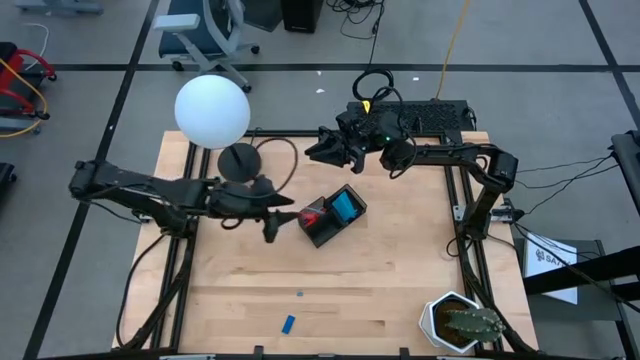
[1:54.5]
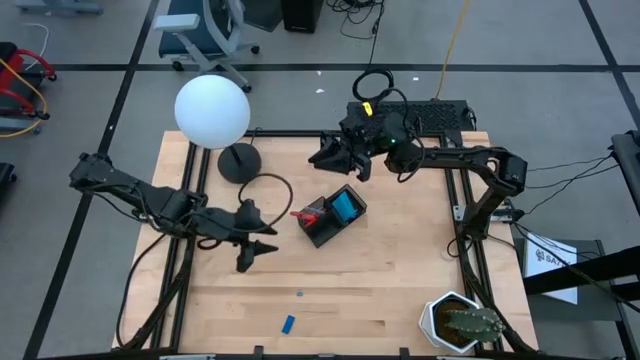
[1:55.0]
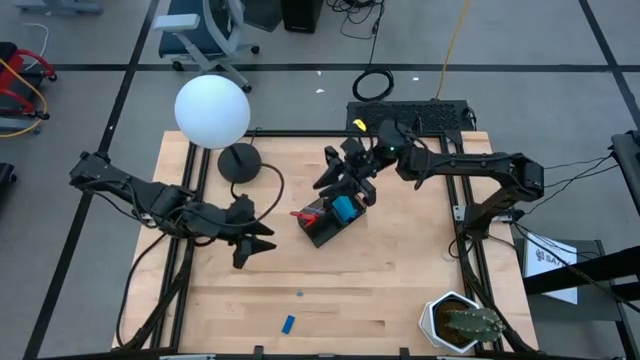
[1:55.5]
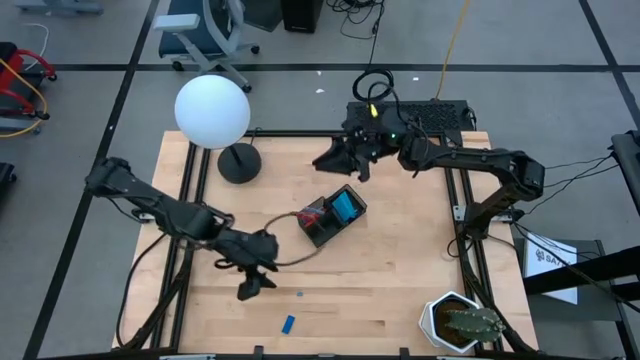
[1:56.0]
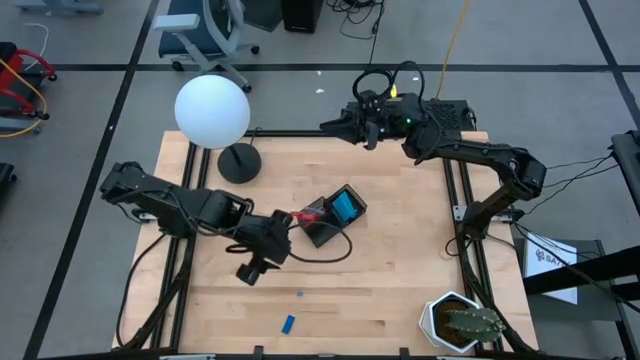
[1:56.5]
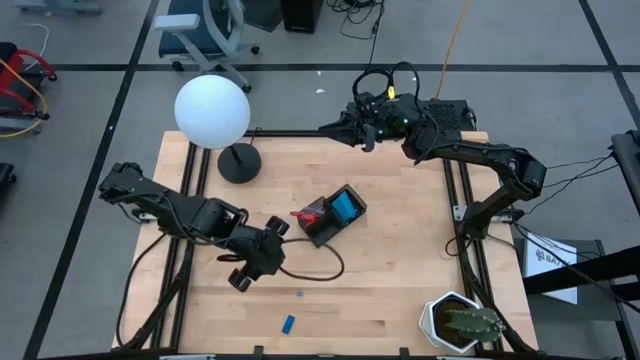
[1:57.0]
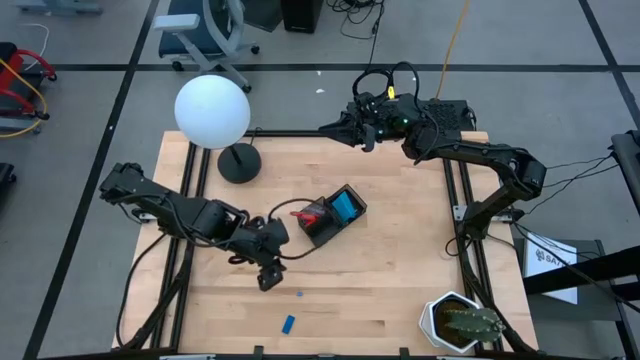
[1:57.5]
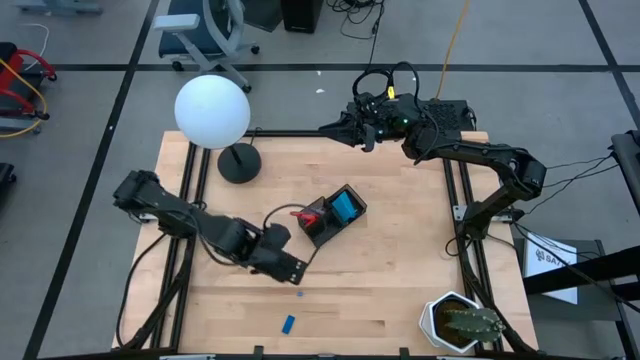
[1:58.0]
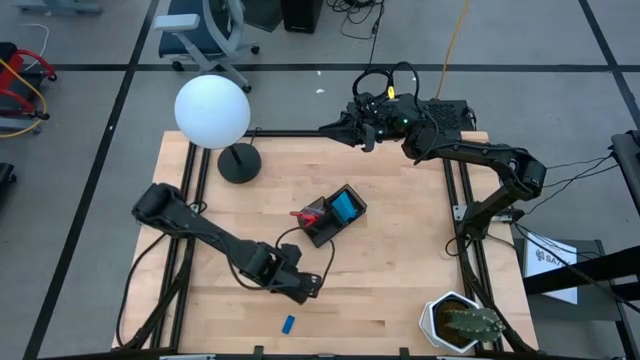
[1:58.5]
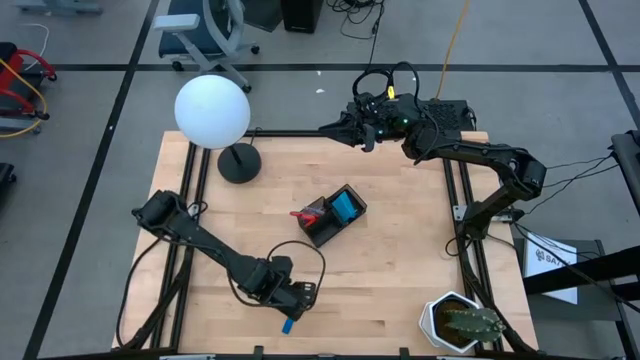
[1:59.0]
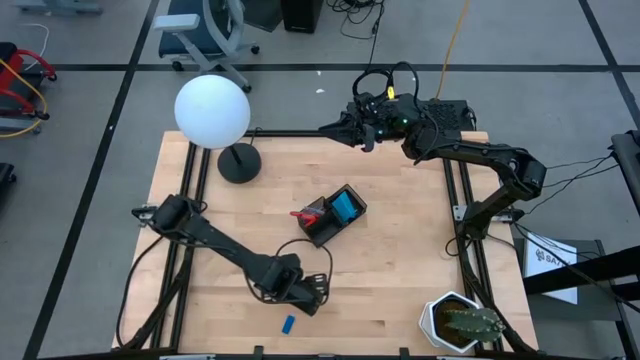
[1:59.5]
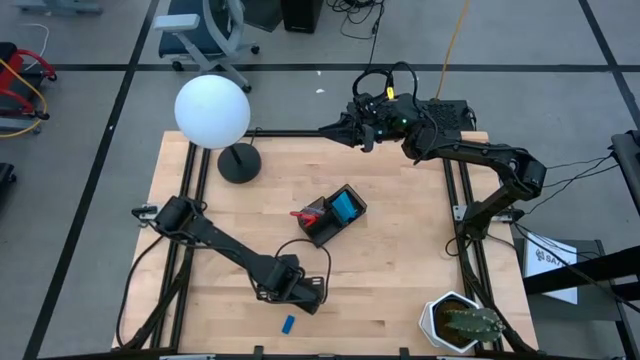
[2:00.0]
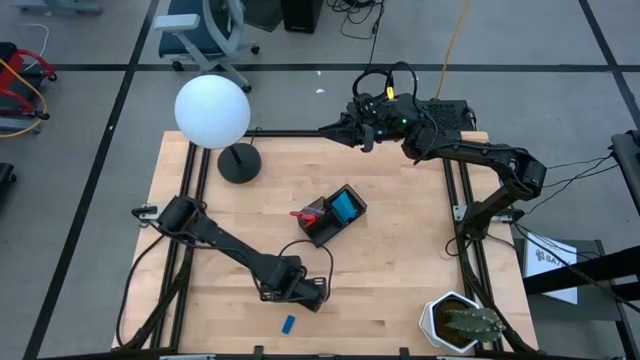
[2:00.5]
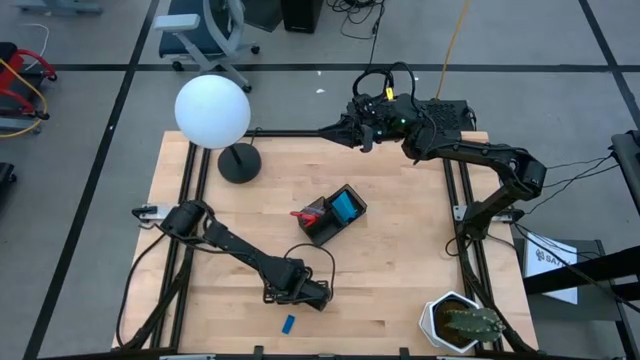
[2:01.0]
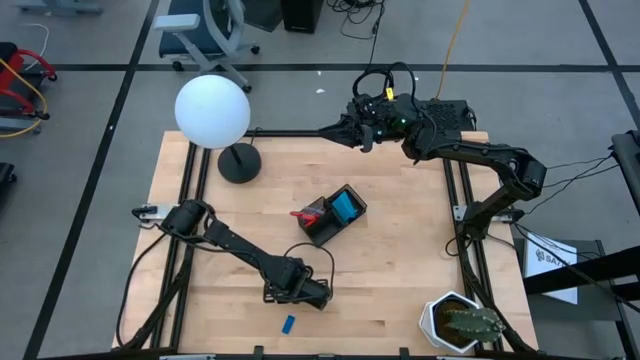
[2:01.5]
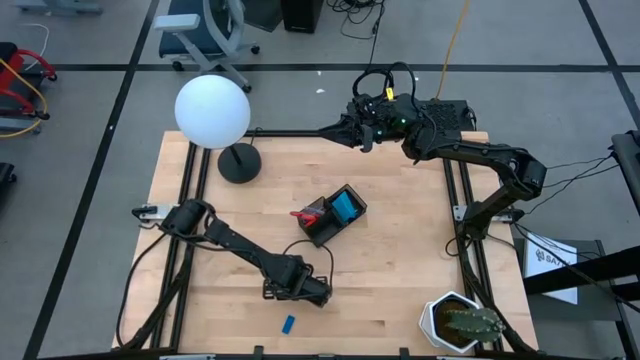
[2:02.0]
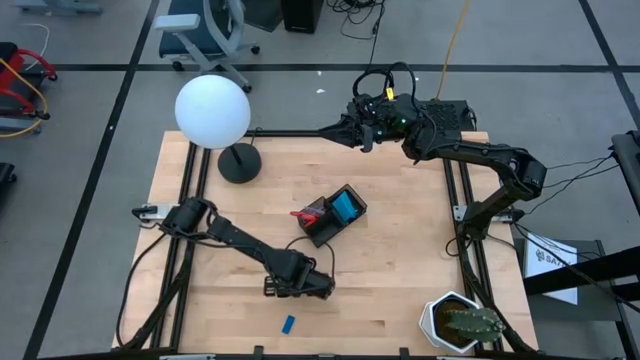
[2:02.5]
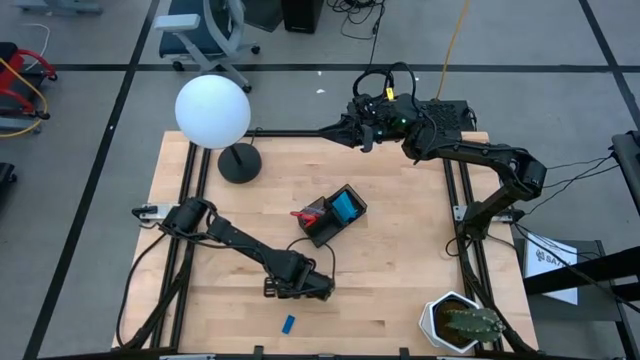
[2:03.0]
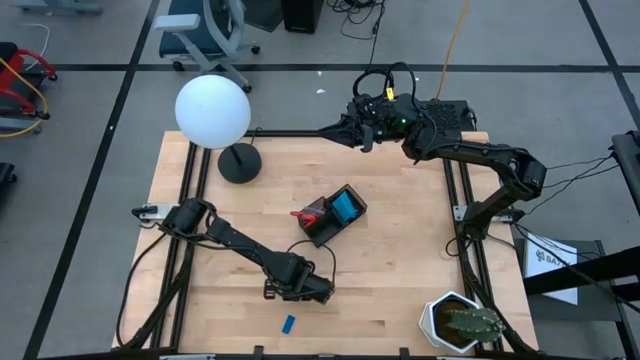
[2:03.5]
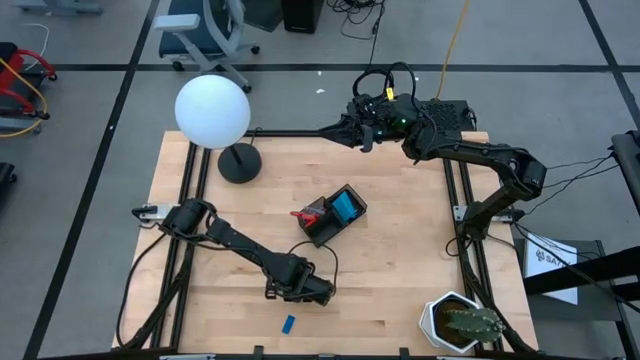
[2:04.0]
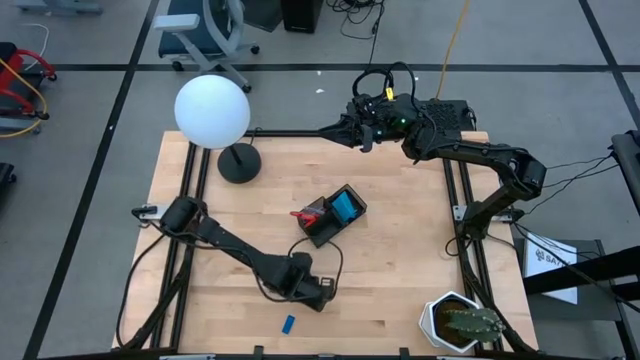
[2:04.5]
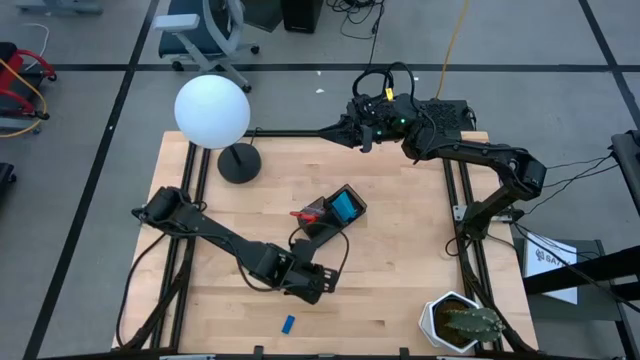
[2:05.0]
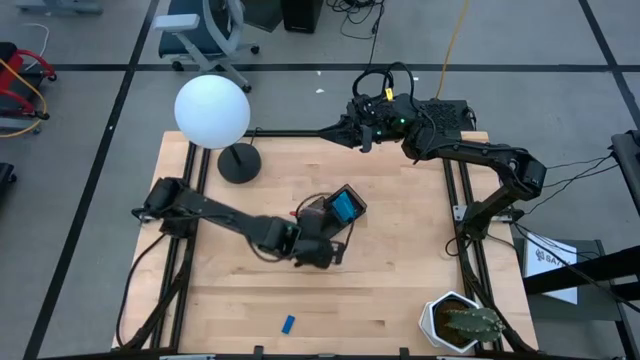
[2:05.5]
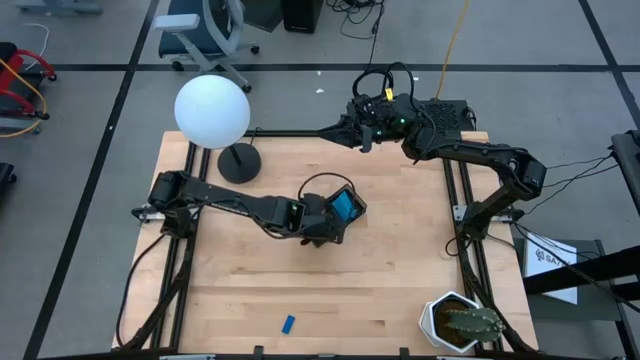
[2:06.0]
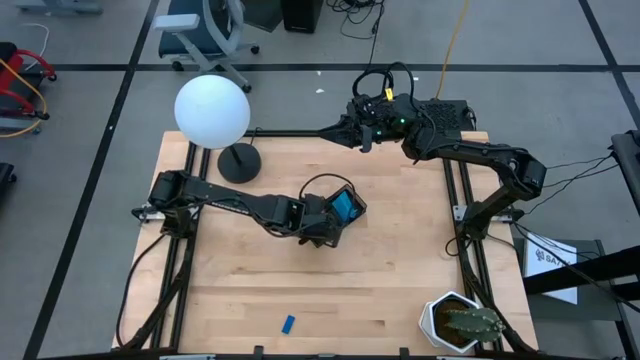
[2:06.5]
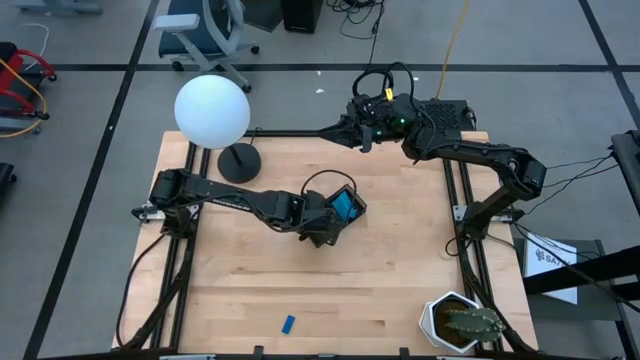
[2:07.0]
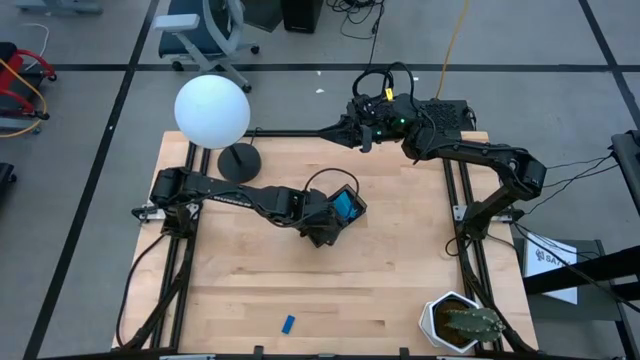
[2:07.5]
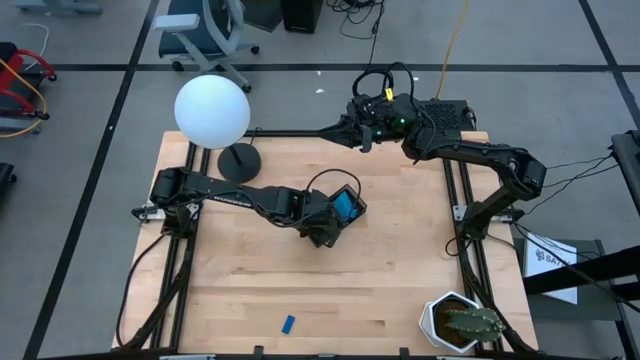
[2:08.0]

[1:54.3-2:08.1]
Task: Pick and place office supplies into organizer
Put the blue paper clip into the desk organizer

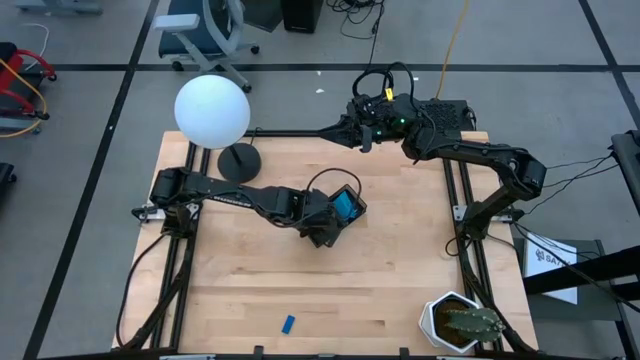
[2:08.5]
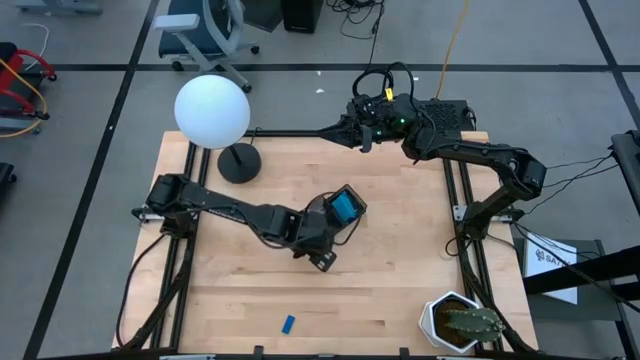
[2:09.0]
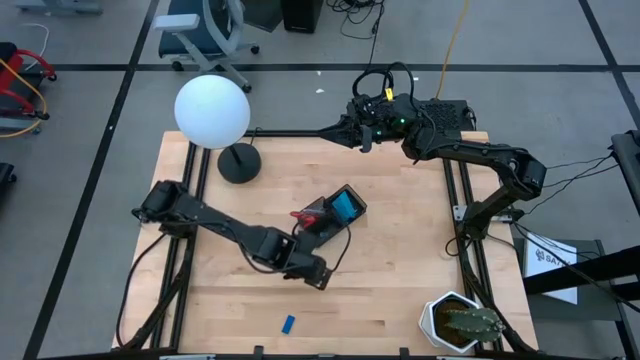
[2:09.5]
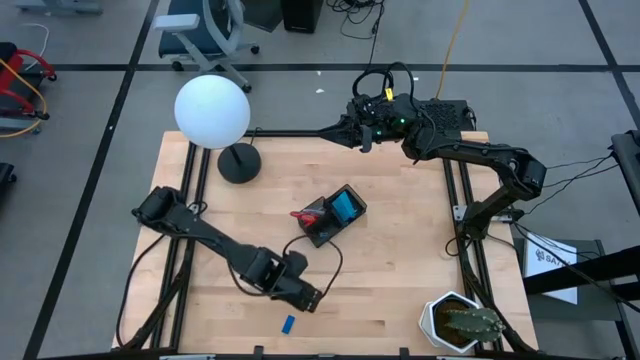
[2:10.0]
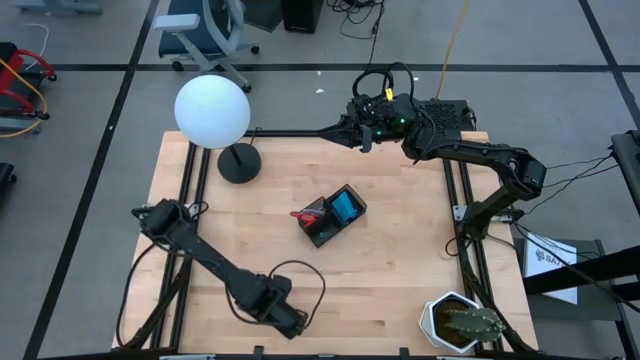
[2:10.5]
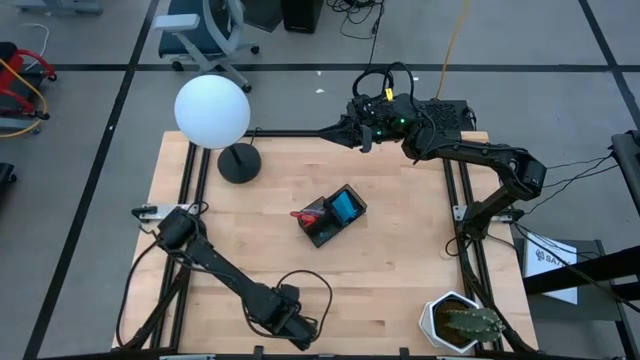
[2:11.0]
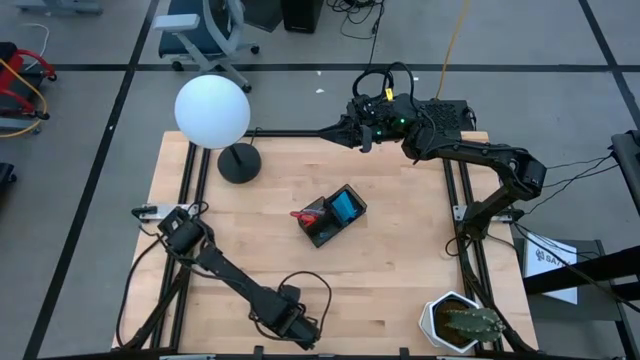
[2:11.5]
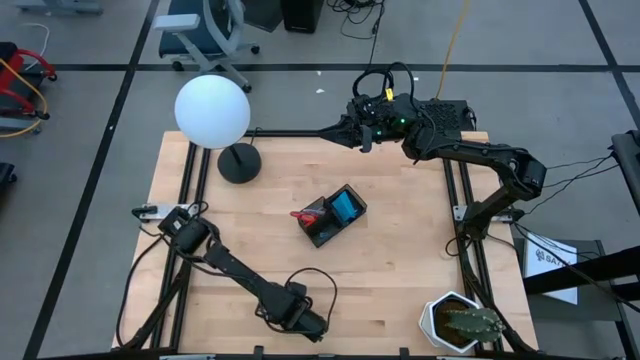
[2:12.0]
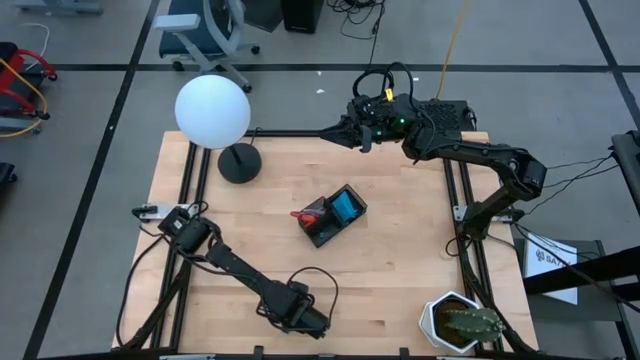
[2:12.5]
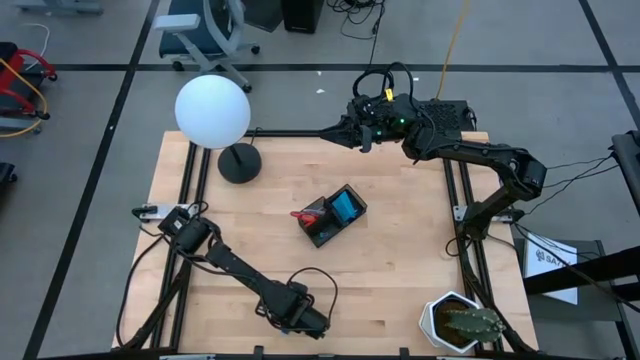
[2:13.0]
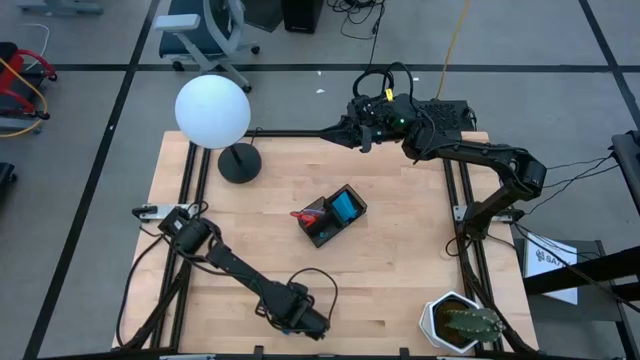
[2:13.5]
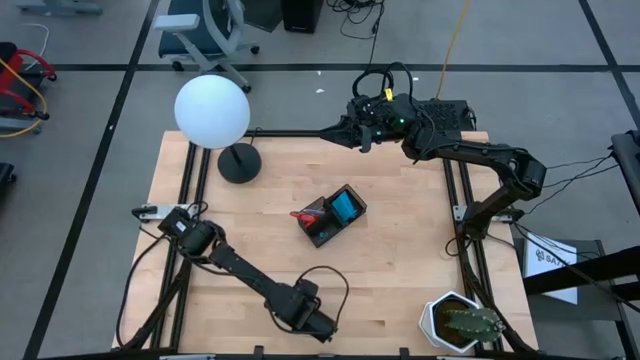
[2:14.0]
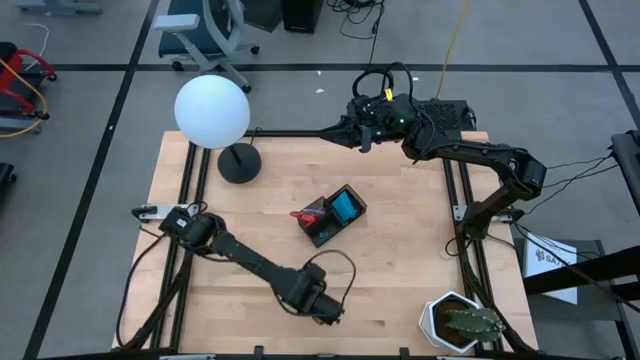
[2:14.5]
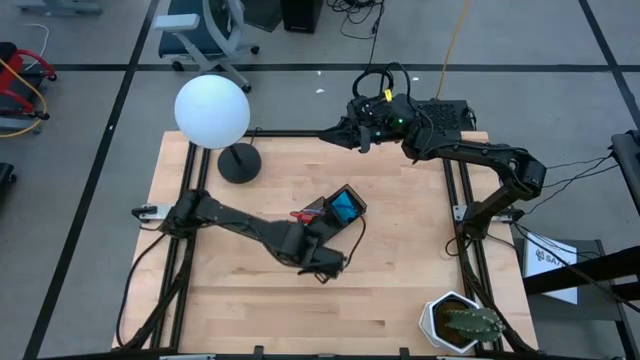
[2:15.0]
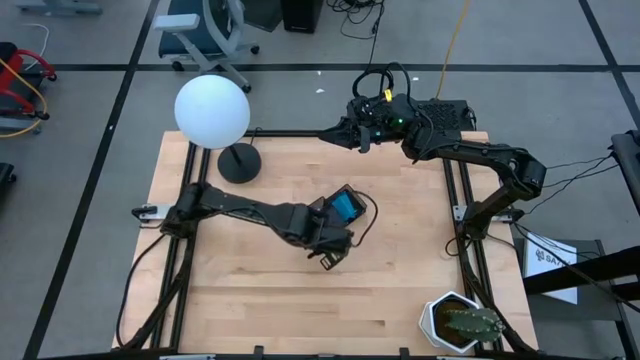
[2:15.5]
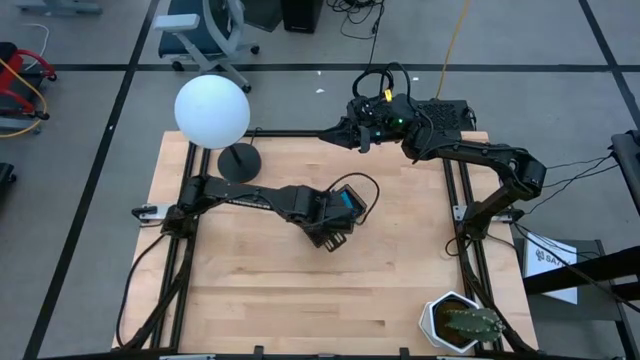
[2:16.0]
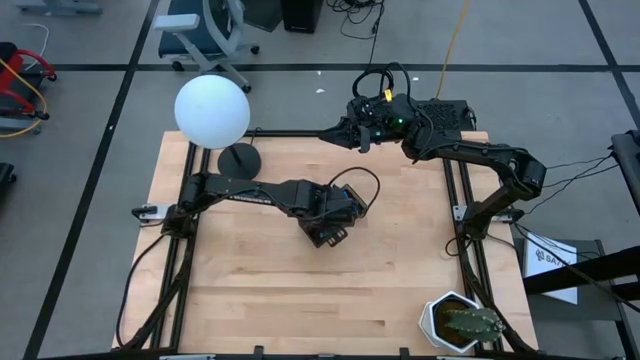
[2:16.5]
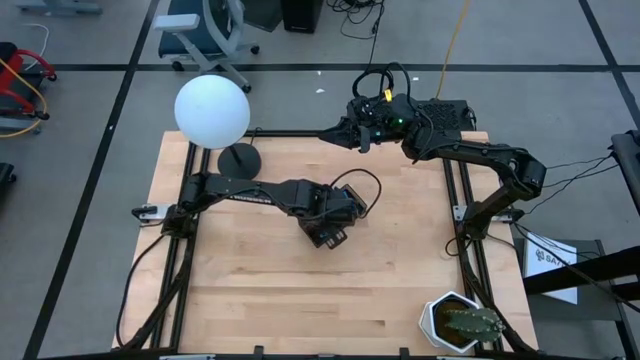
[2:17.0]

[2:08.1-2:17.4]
Put the blue eraser into the desk organizer

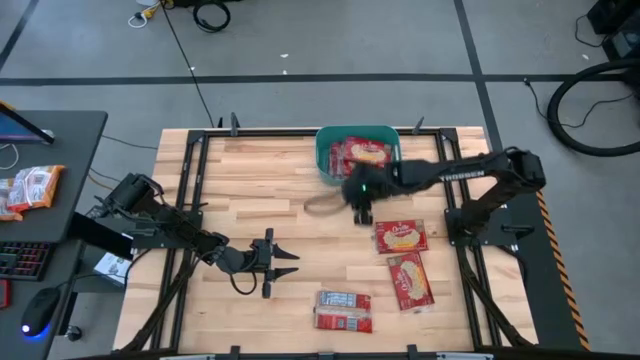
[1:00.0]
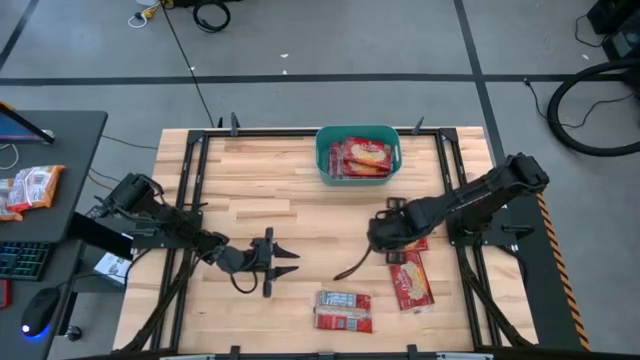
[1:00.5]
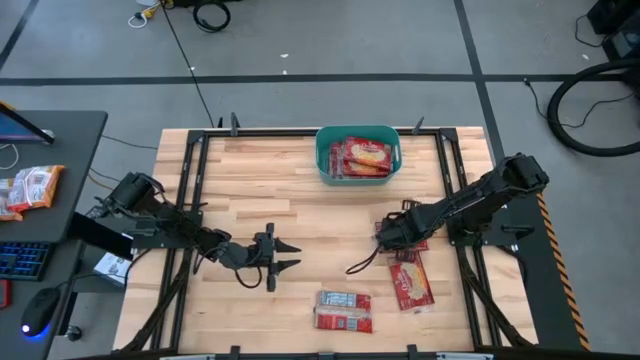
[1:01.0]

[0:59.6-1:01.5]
Task: Sort popcorn bags into baskets
Adjust the red popcorn bag
